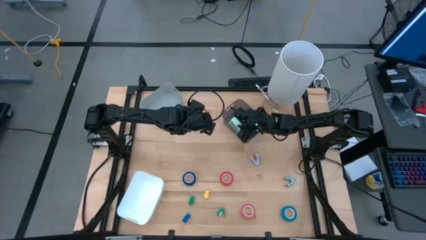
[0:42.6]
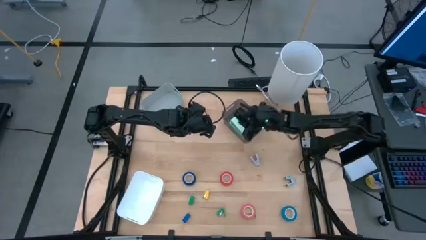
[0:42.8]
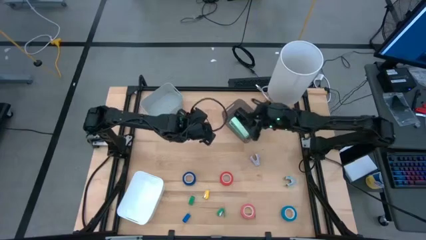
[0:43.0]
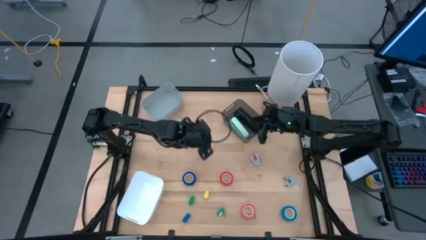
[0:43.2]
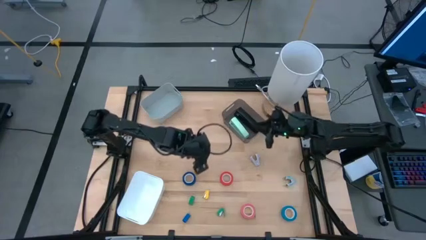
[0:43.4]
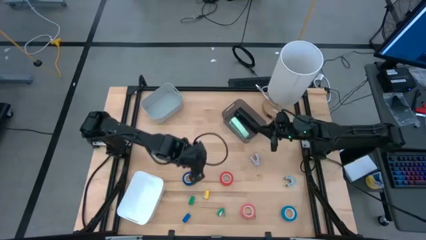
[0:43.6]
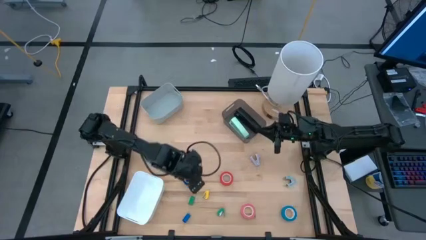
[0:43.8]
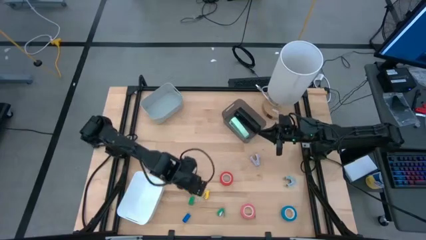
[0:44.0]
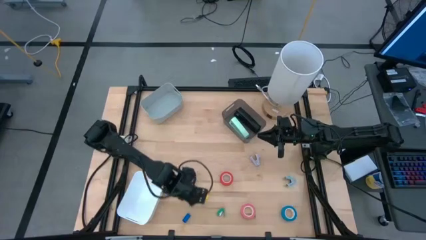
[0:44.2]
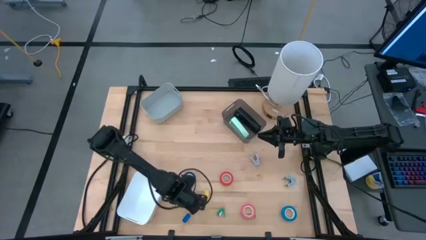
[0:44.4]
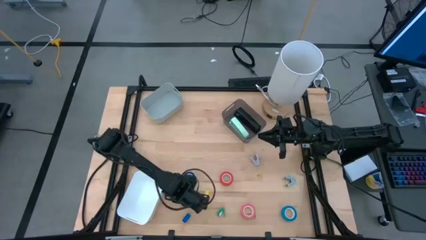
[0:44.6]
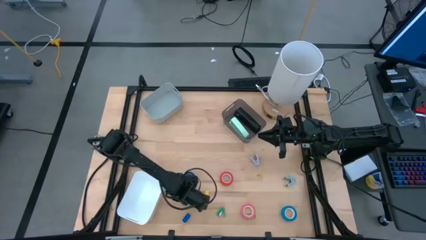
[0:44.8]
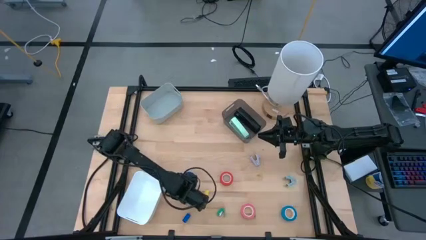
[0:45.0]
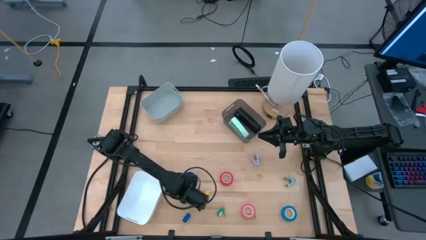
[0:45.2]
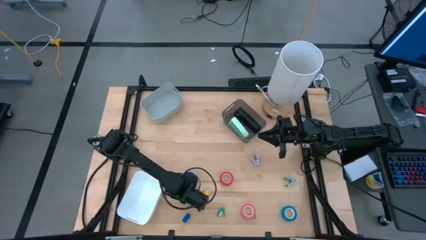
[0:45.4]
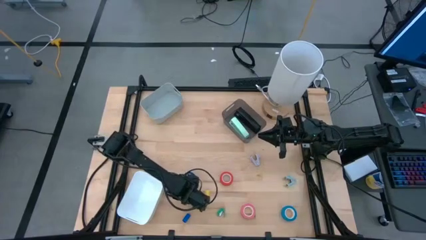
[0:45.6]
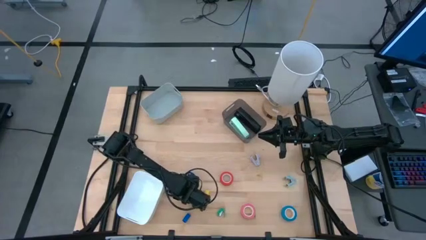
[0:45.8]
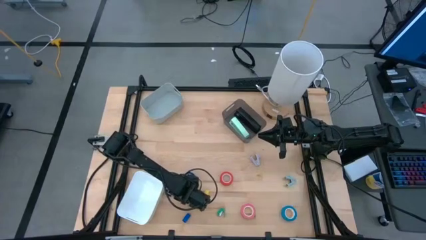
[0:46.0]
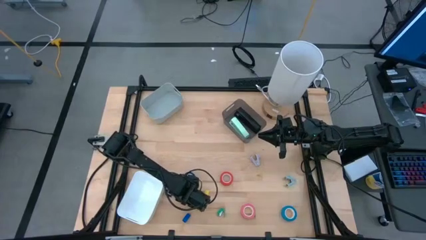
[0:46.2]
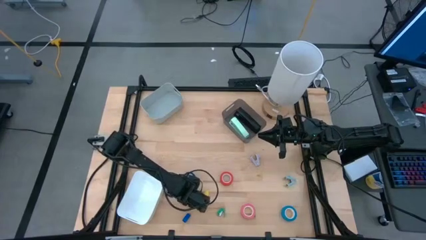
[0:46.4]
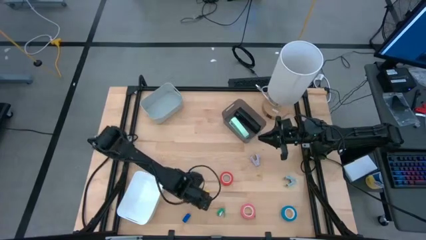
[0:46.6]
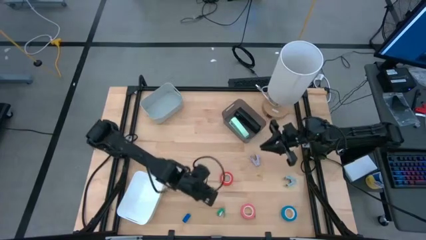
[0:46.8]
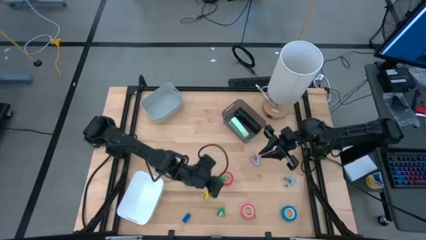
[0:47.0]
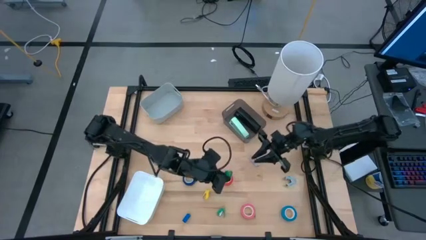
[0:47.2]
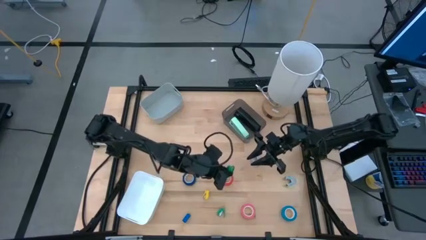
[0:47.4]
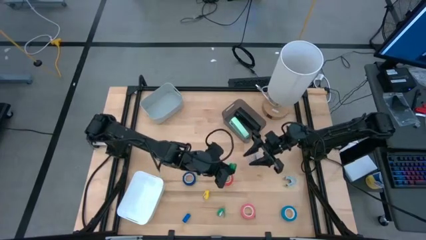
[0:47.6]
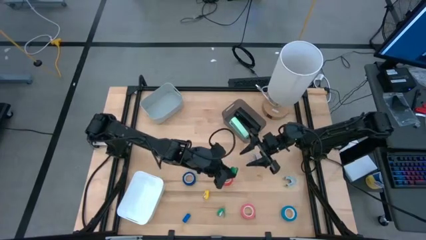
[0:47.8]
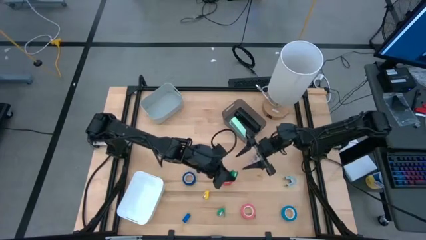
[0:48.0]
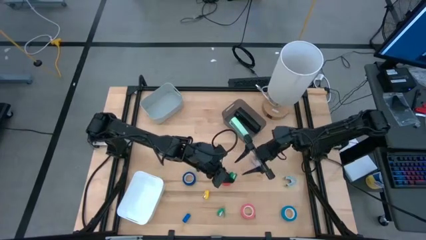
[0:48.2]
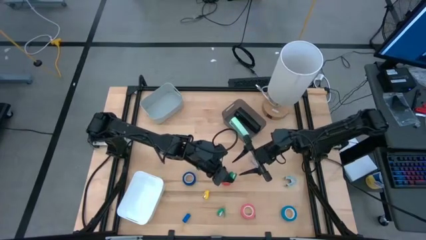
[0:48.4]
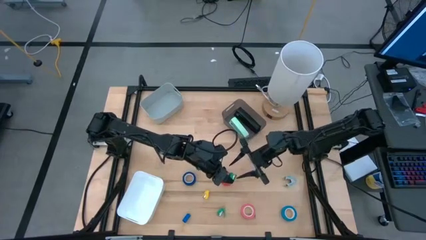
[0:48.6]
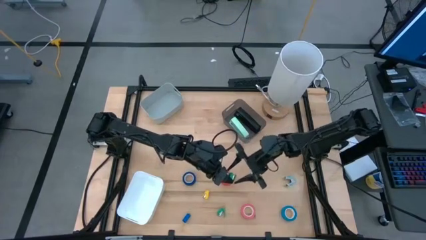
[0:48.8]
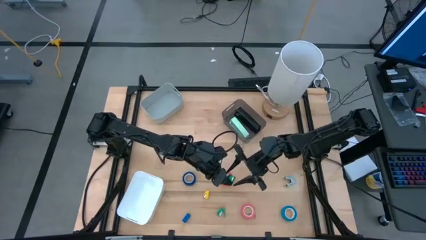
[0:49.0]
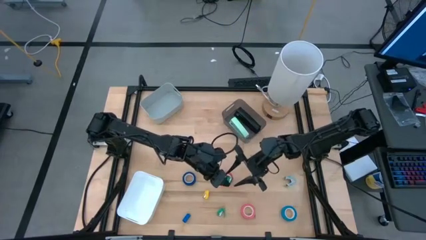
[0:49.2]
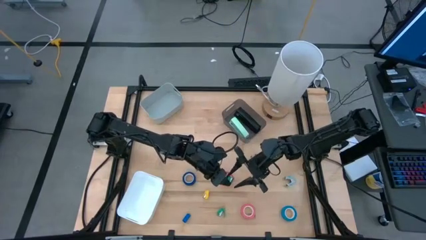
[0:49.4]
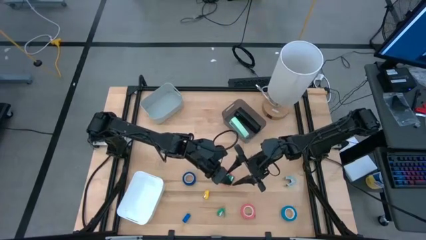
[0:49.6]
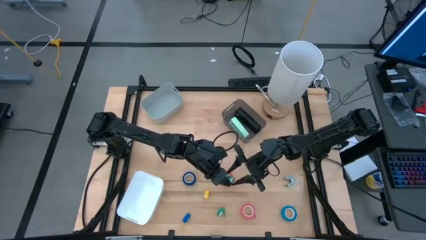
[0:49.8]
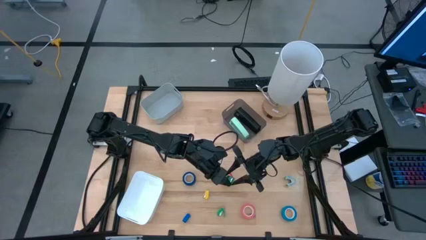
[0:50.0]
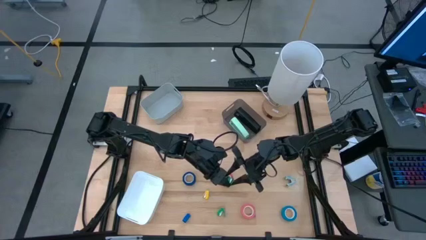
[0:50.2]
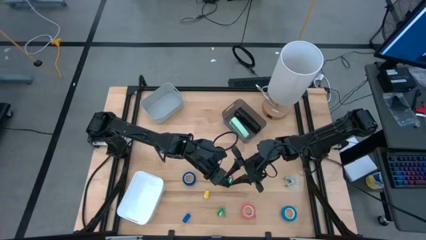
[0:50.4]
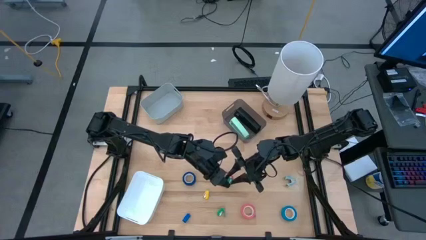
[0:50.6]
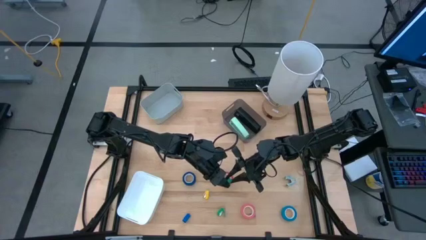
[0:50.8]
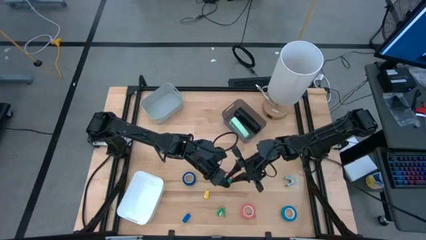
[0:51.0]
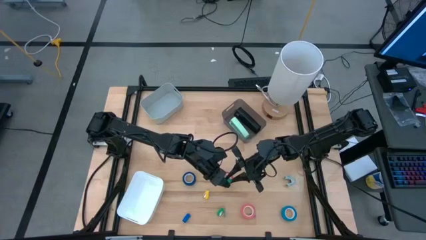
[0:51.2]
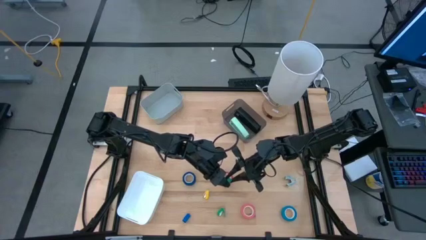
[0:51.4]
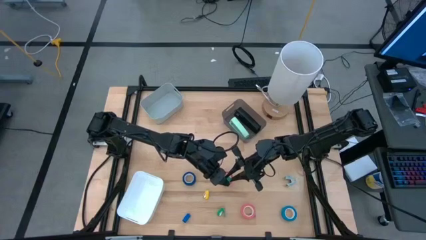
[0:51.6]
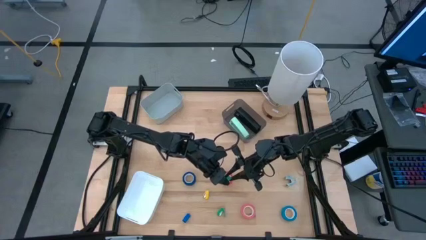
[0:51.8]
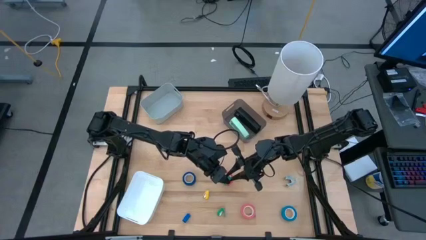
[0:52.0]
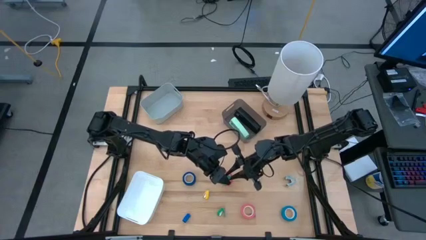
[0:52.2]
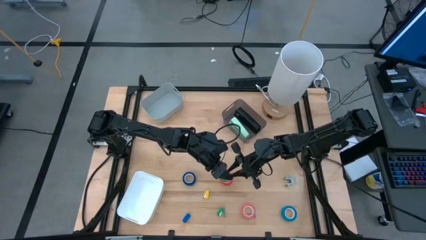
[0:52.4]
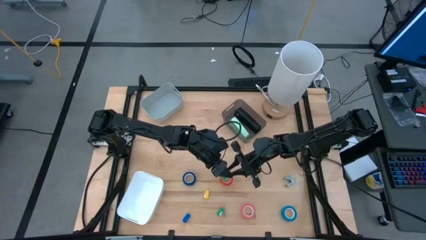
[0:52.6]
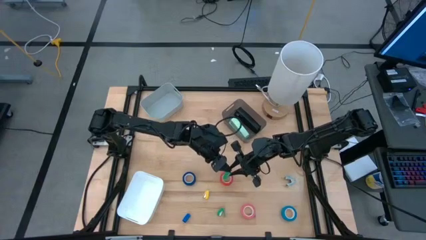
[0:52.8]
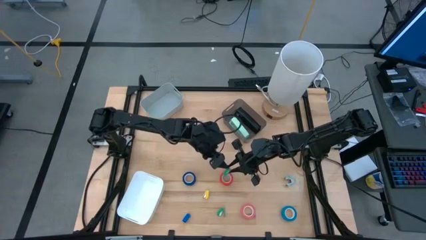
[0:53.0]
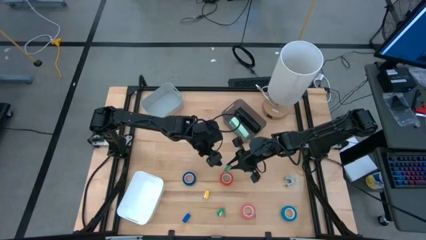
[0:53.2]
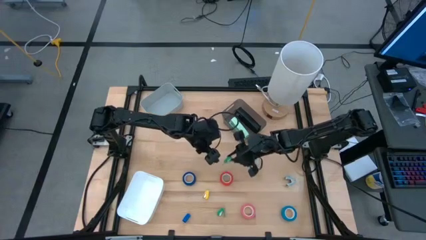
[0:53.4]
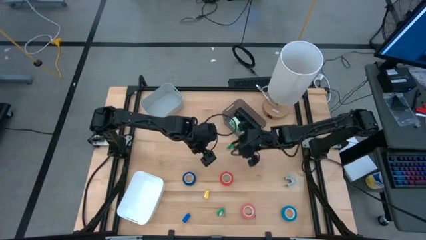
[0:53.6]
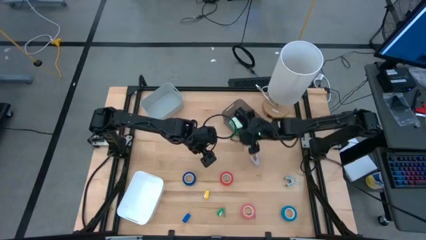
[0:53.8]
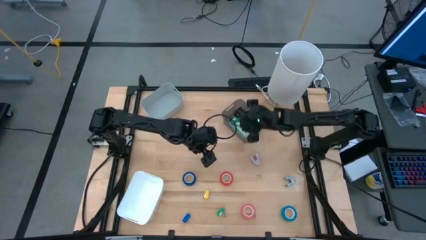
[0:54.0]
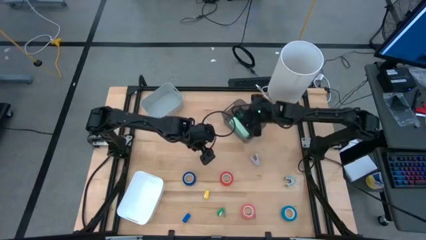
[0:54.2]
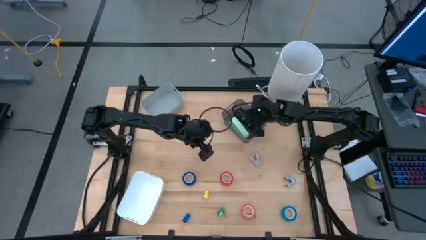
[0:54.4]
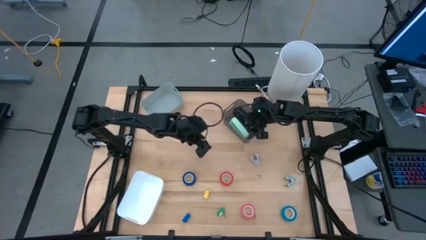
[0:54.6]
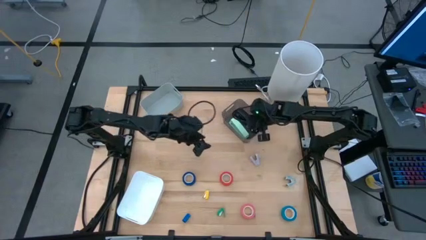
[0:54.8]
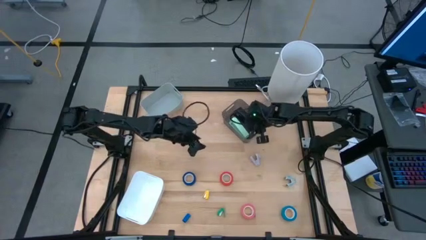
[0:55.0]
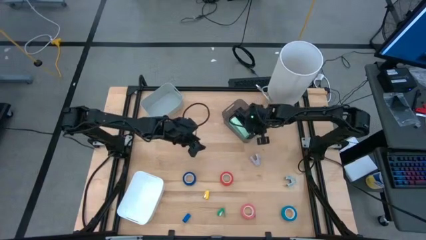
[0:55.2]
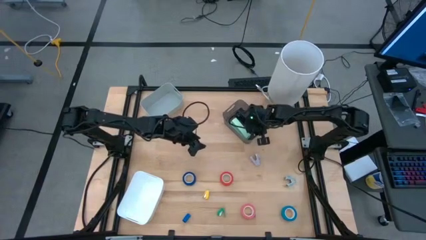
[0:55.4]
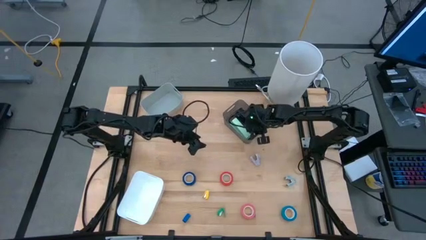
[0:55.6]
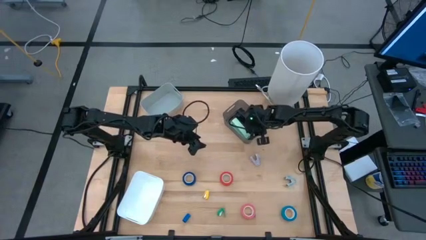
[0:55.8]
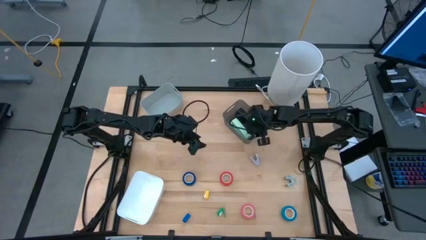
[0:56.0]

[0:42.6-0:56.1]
Task: Pick and place Stapler, Stapler remover, tape
Put the top left green small stapler into the black bin

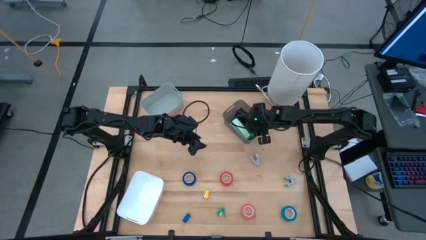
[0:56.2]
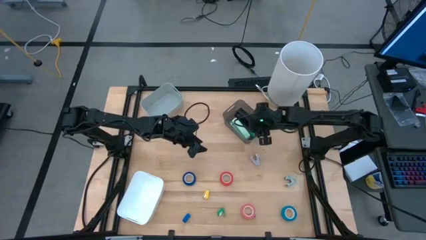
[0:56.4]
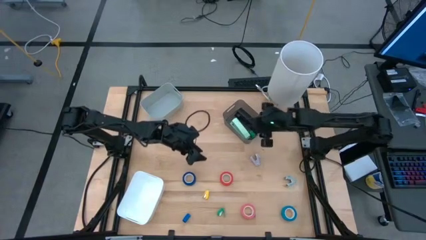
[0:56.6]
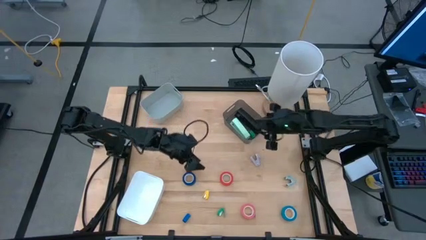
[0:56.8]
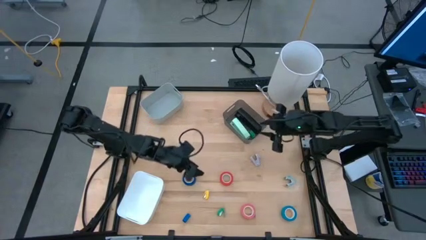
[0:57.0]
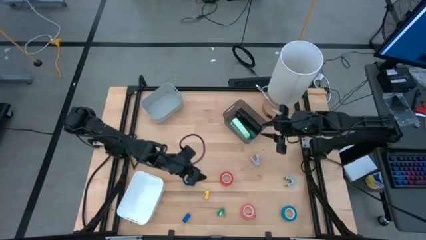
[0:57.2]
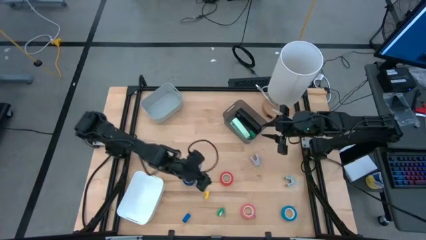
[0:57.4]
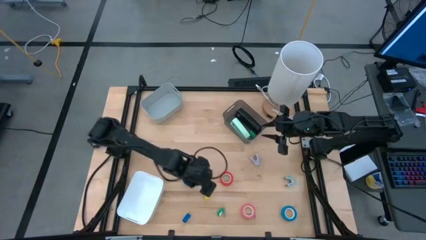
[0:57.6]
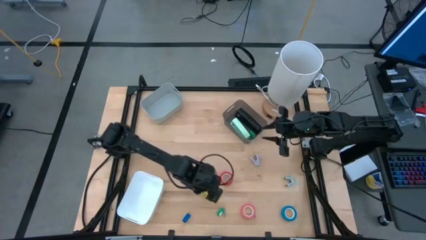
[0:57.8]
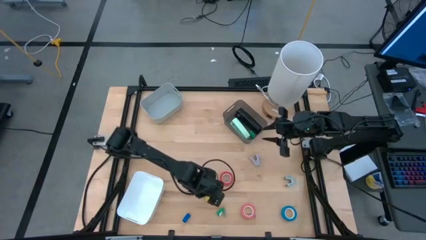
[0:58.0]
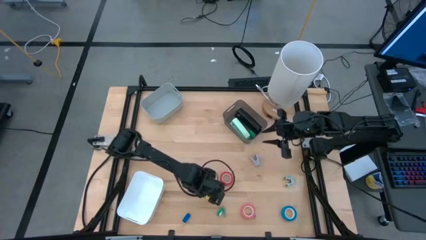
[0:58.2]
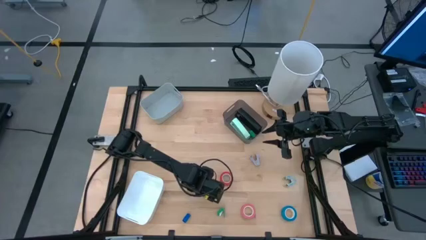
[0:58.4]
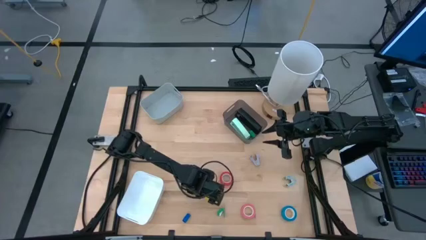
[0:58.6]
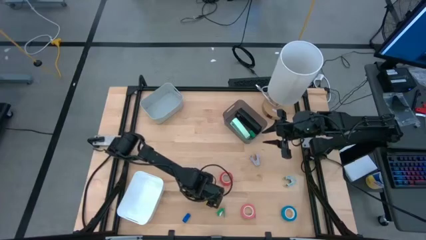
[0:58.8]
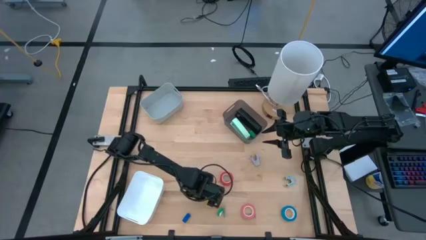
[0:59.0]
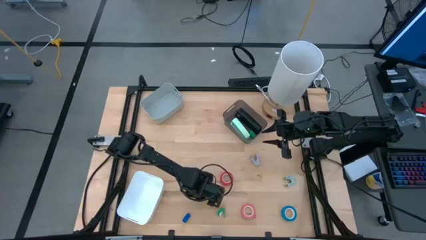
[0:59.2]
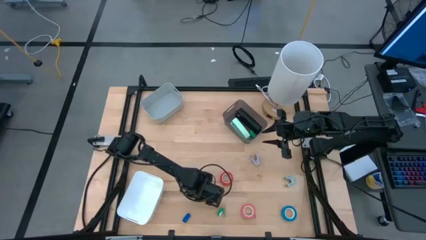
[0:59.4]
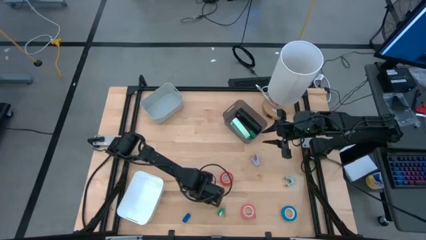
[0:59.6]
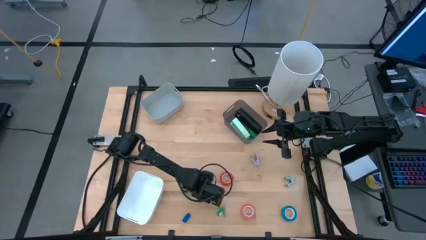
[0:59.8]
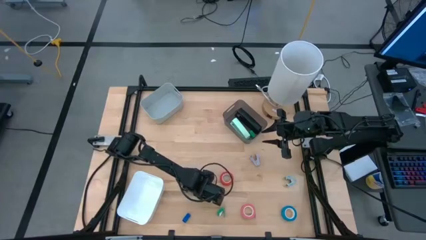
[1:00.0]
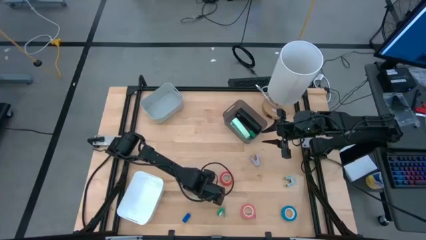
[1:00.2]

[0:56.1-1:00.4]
Put the small yellow stapler into the black bin

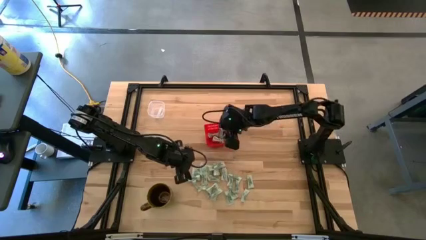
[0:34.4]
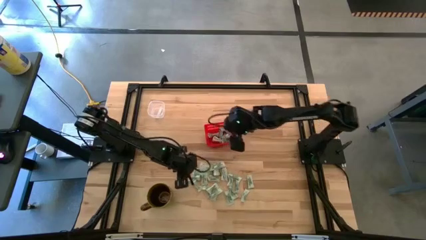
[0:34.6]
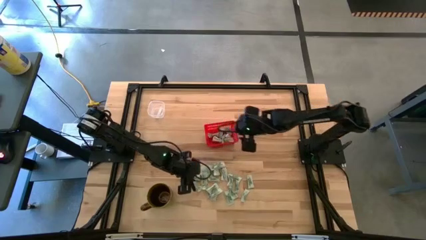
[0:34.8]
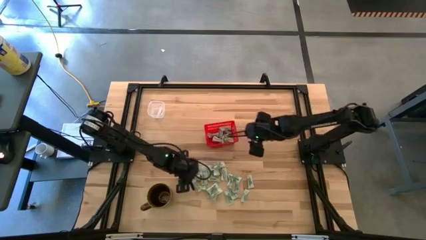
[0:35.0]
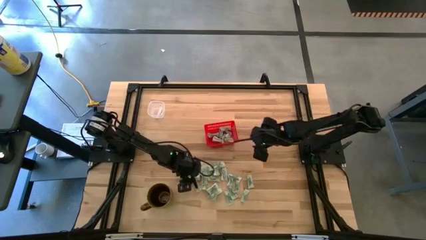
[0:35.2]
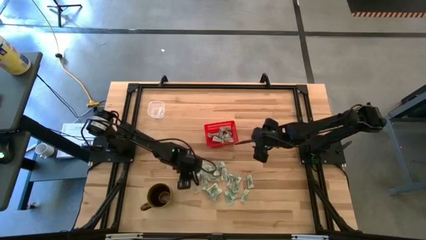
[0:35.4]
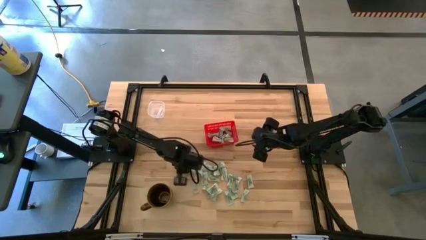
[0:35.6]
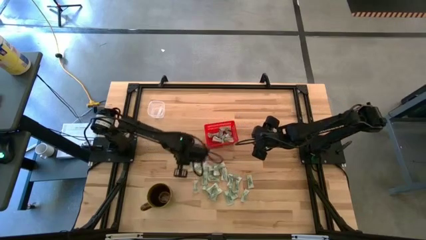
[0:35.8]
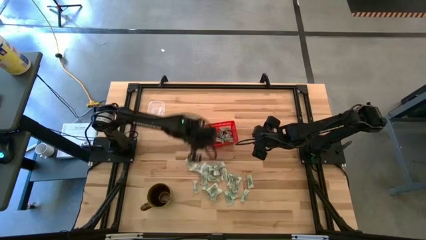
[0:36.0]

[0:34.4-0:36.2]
Task: Pick and place items into bin
Put the green stevia packet into the red bin
